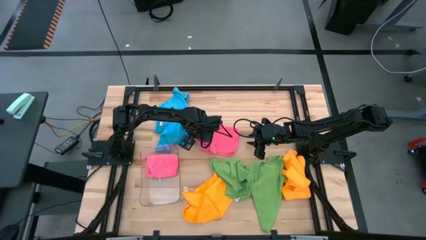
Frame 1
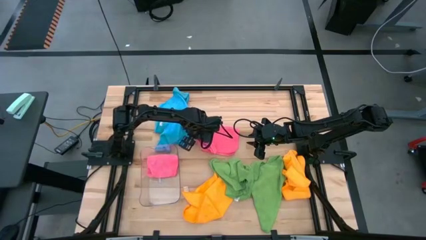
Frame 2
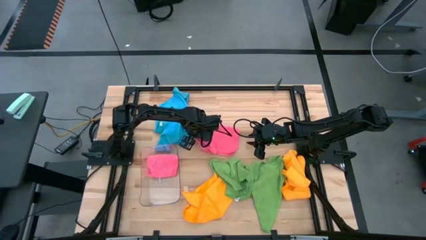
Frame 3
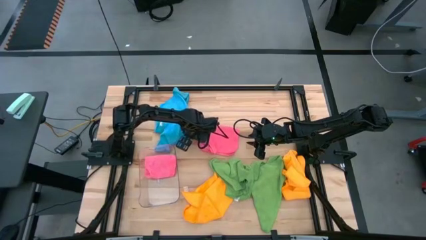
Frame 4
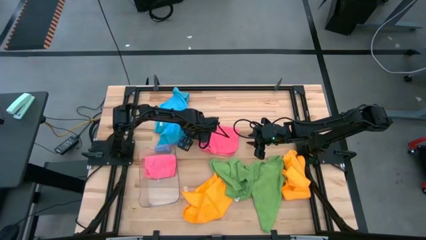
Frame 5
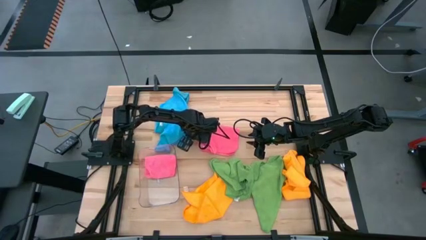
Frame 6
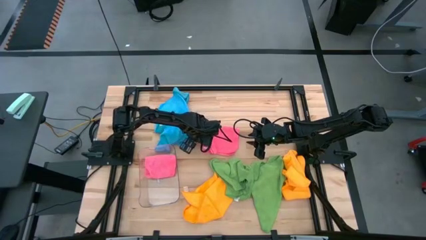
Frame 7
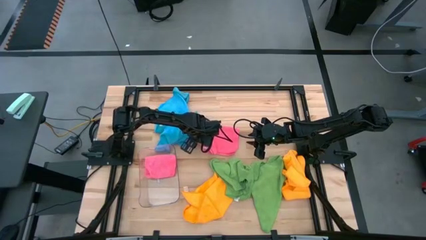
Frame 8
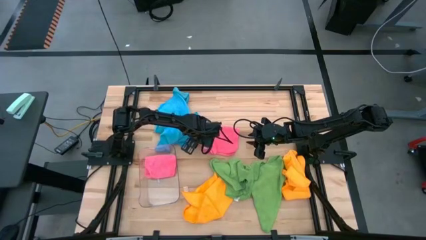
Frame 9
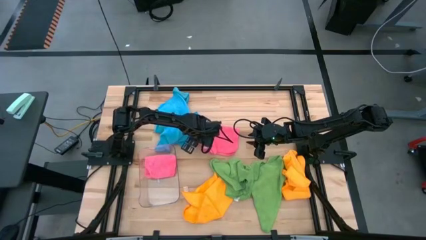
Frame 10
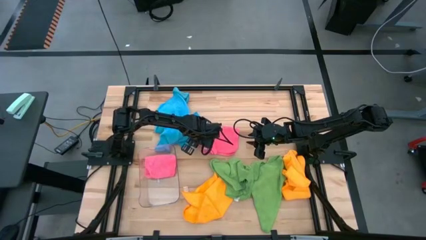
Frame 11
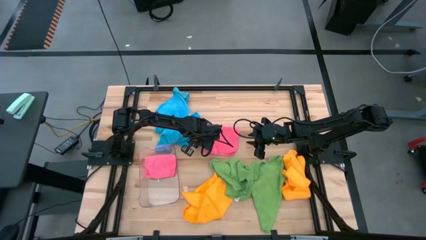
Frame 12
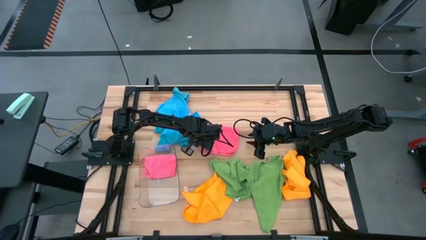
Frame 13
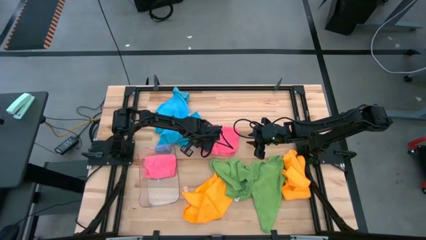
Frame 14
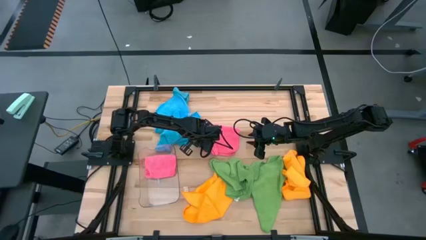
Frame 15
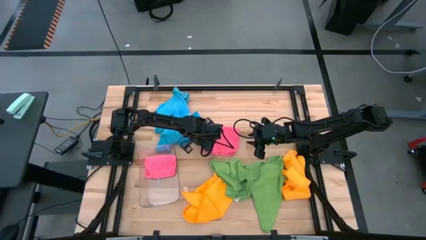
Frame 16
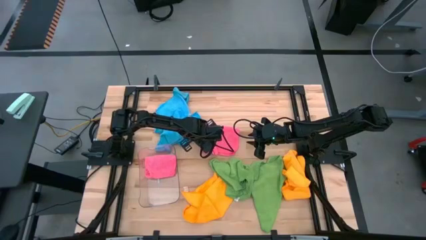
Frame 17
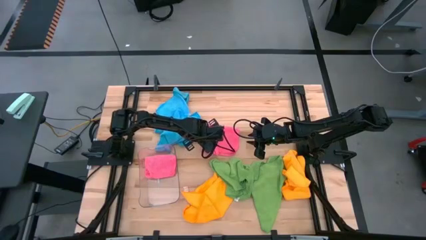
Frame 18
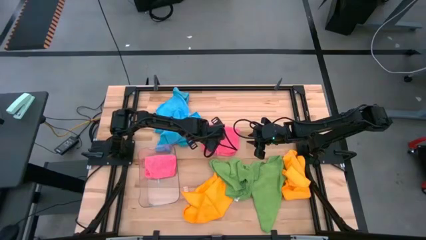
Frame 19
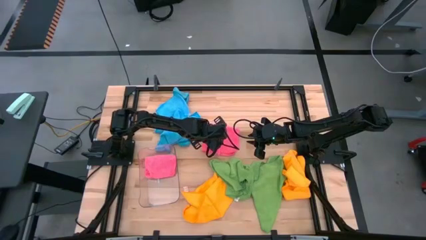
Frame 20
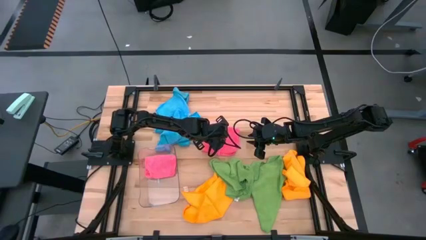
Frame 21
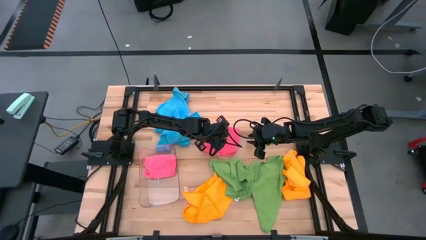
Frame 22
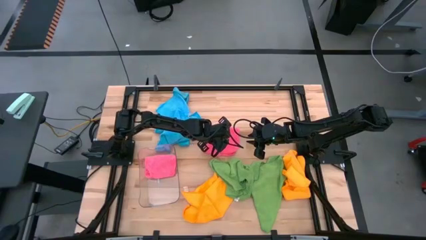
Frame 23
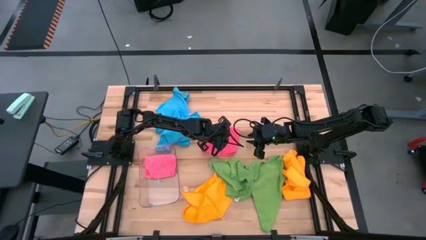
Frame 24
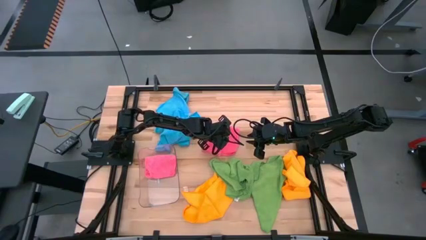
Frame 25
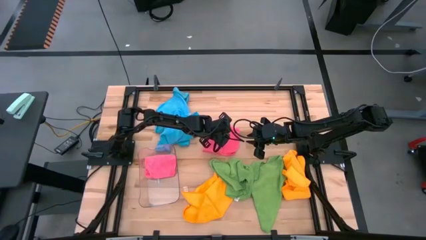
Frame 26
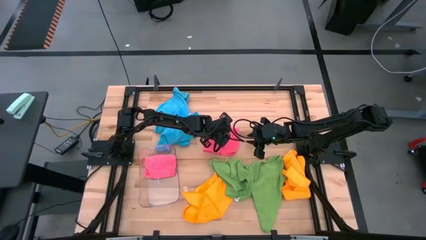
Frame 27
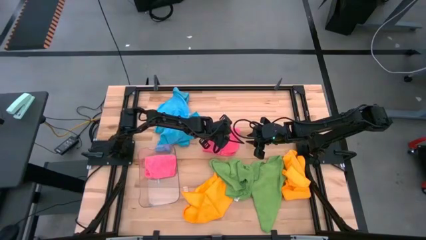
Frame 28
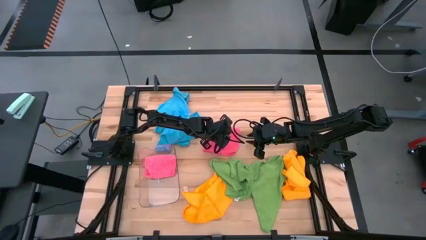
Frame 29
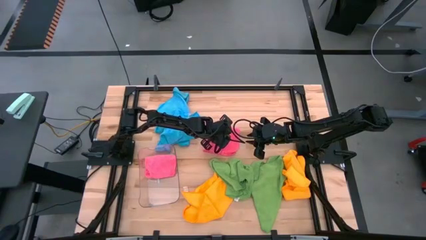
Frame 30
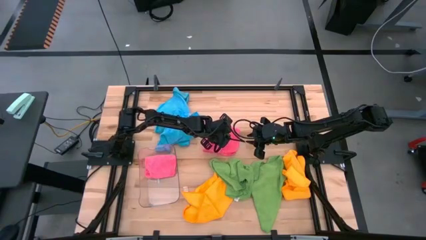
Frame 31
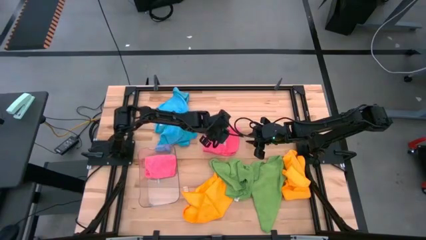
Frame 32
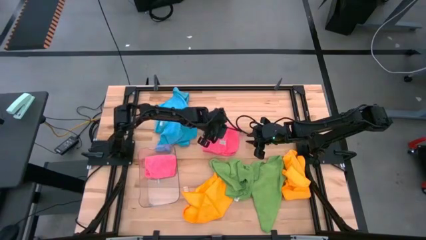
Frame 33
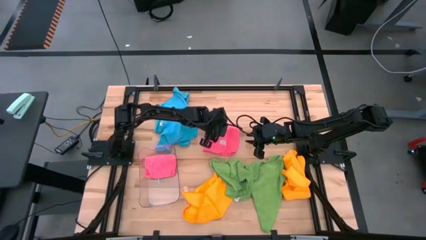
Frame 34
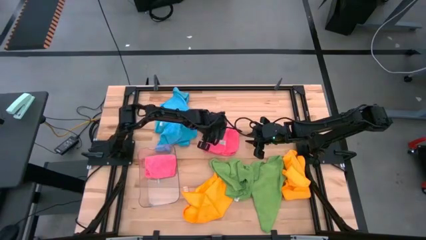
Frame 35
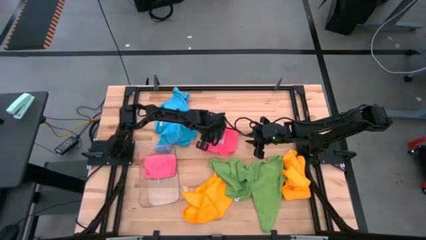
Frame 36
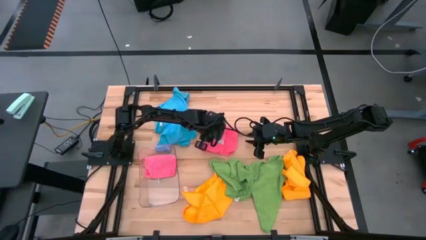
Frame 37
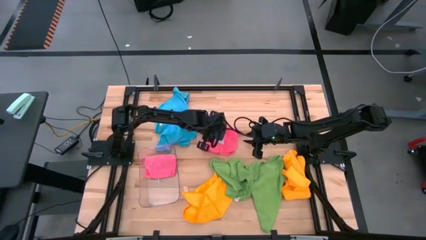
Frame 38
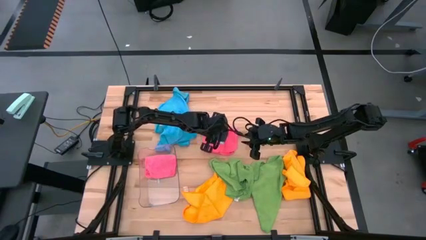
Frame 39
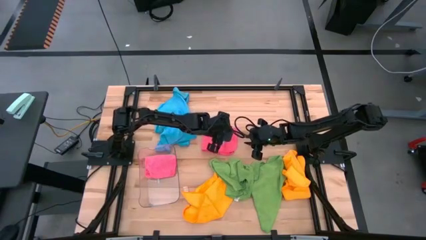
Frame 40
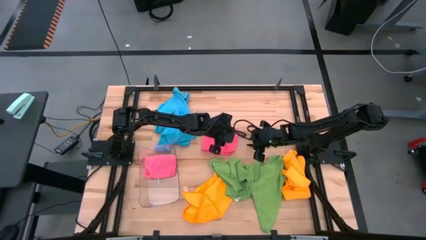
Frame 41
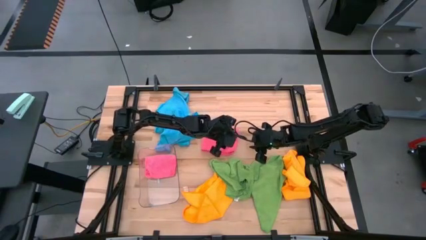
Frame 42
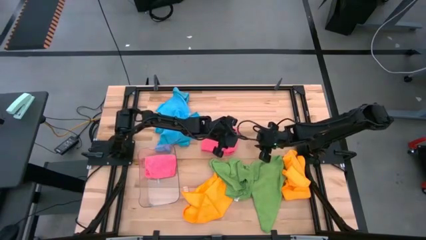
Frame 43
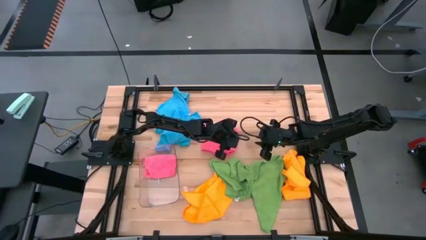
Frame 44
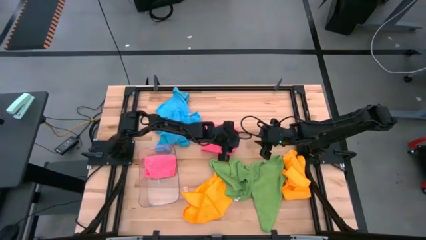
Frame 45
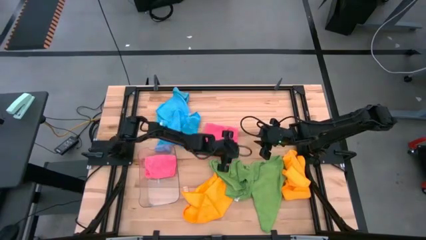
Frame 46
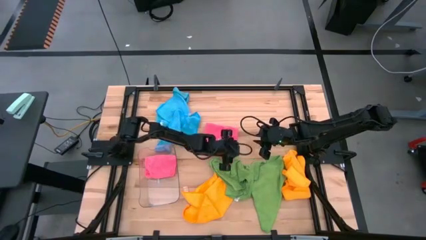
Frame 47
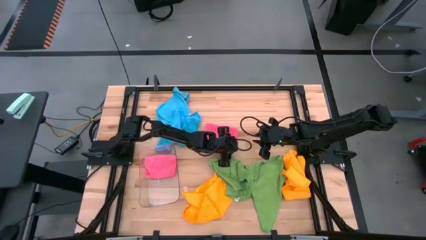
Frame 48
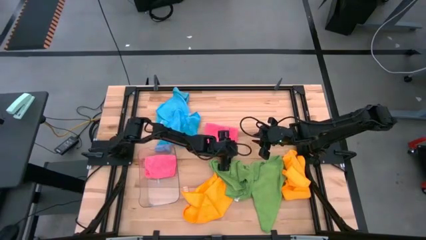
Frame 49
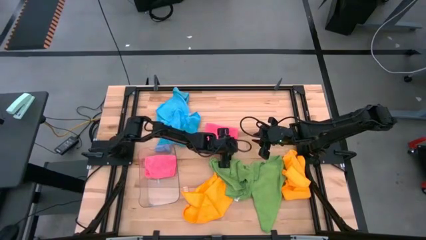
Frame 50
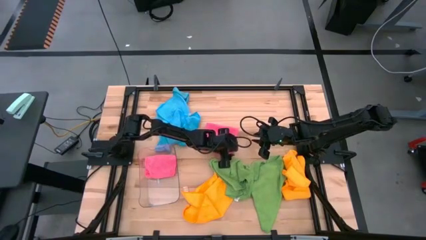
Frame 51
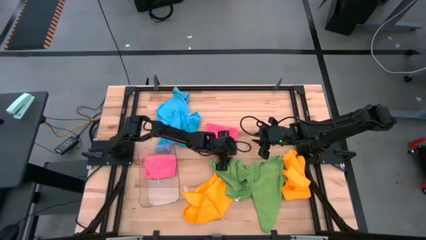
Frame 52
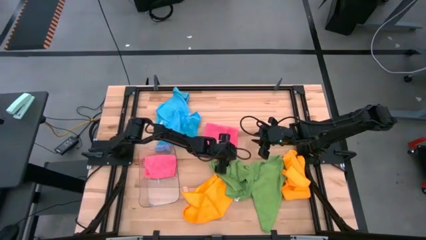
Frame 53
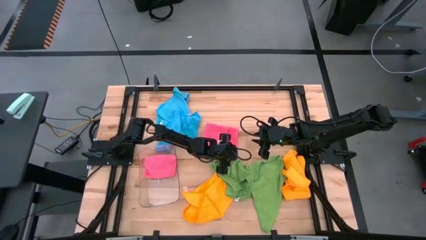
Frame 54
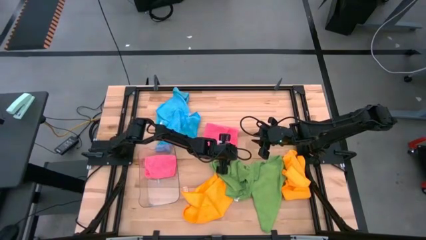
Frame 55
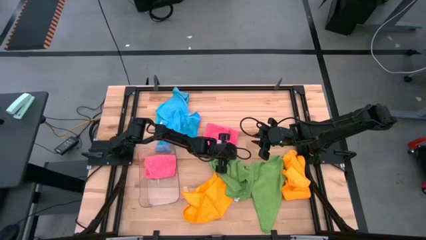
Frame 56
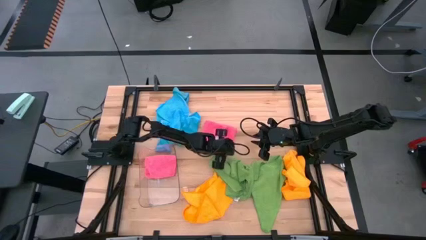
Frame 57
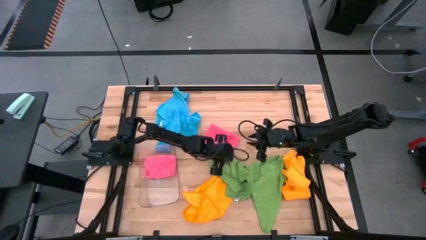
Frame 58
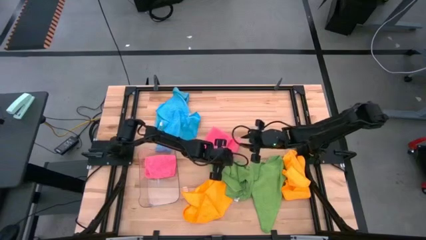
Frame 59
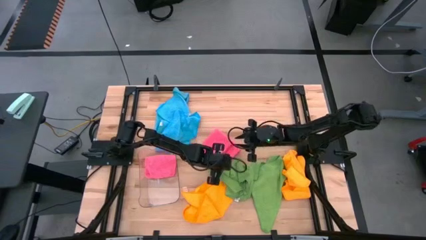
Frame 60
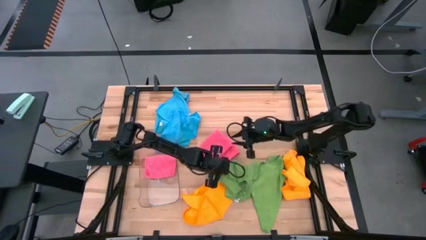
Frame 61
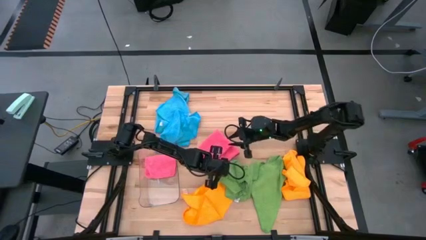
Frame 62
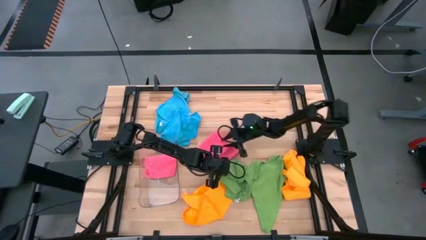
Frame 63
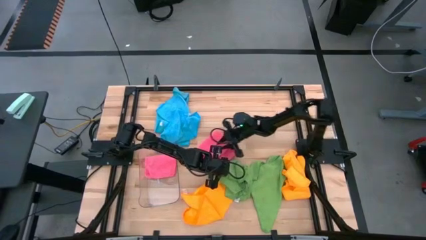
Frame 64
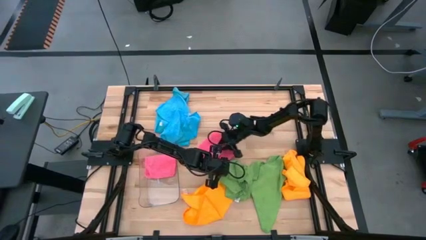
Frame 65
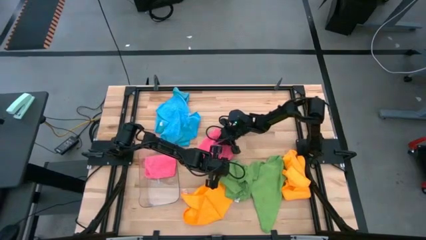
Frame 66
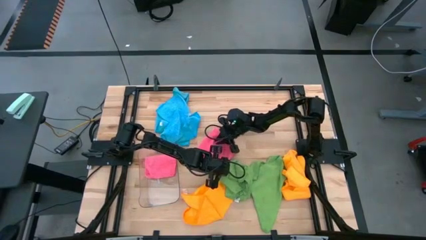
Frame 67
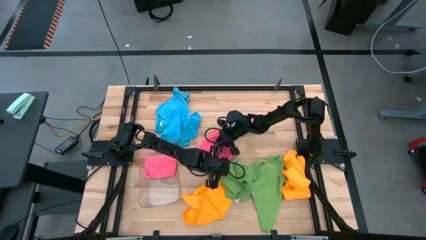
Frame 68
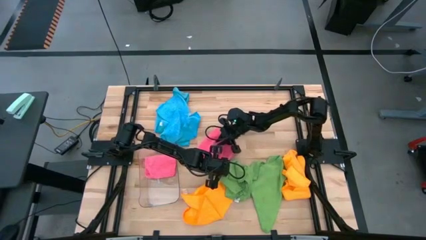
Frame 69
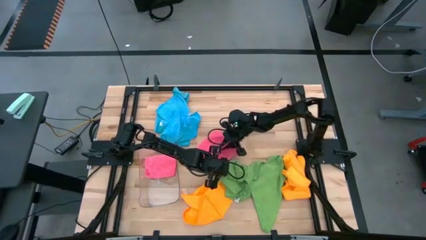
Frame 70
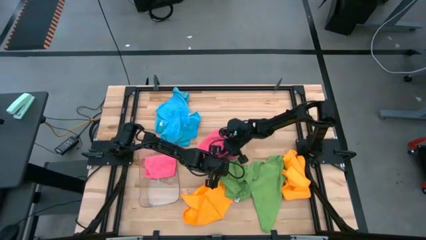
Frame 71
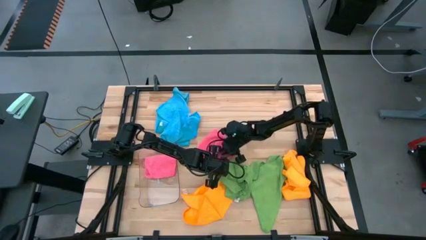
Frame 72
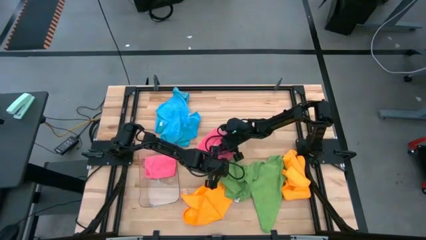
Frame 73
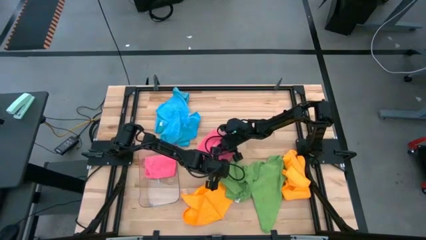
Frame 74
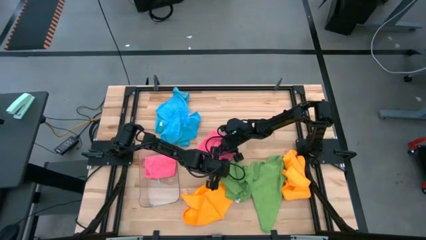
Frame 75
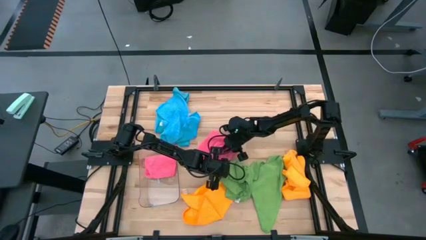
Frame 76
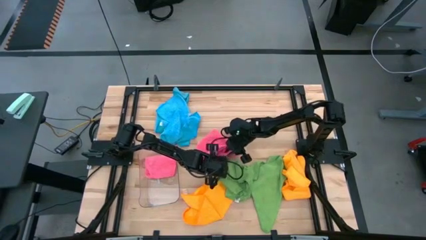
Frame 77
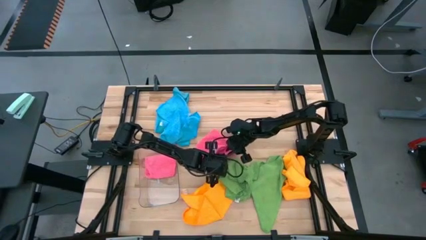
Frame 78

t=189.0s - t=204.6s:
Task: Fold microfiber towels
Fold the pink microfiber cloth
